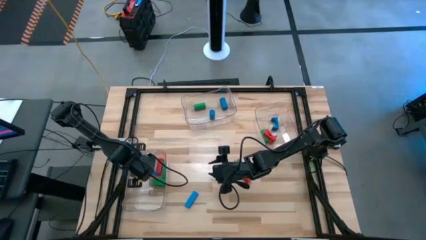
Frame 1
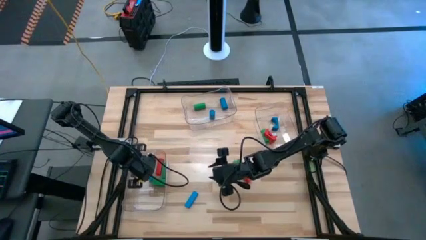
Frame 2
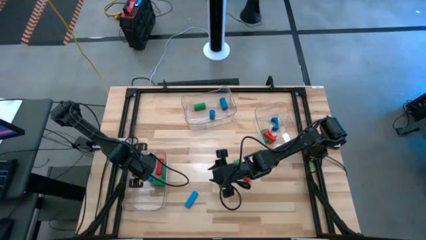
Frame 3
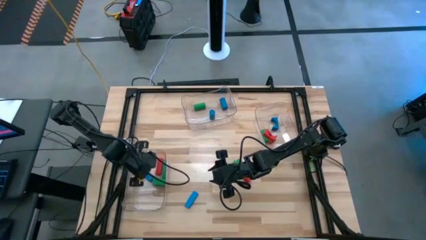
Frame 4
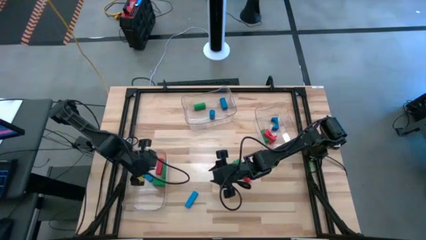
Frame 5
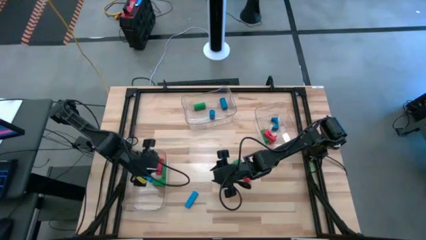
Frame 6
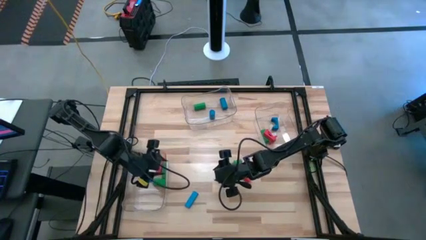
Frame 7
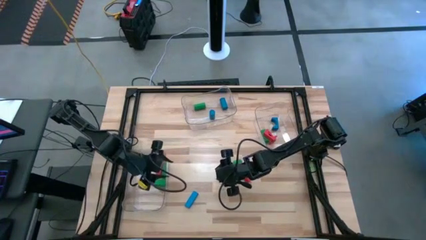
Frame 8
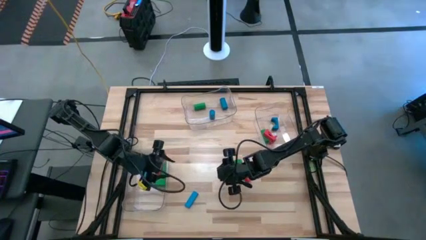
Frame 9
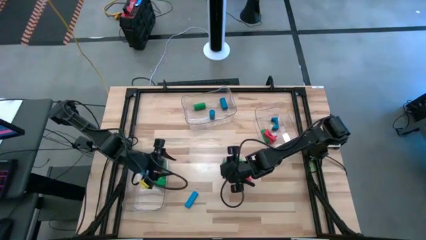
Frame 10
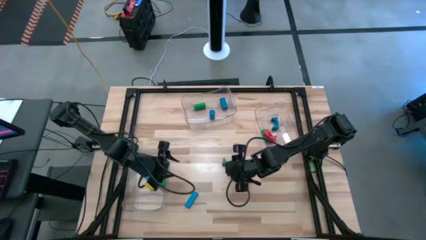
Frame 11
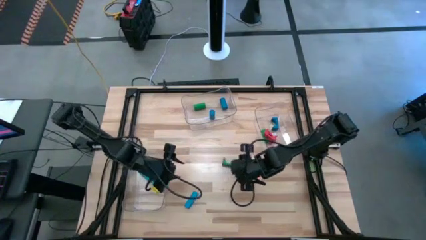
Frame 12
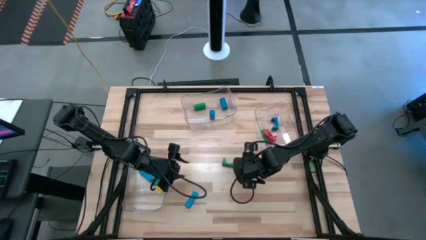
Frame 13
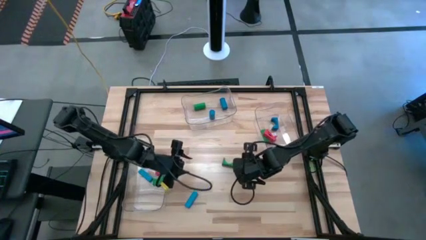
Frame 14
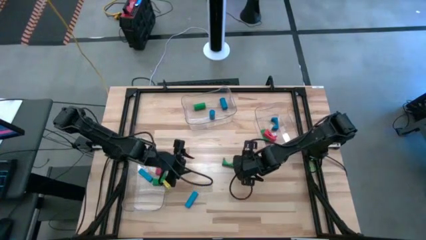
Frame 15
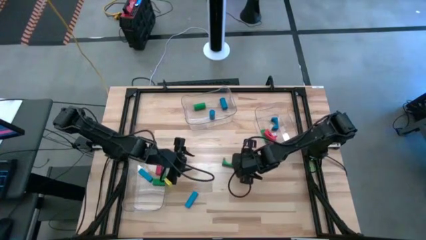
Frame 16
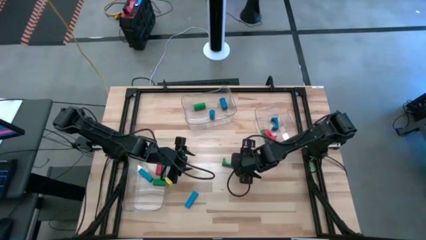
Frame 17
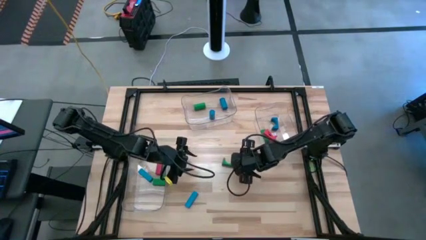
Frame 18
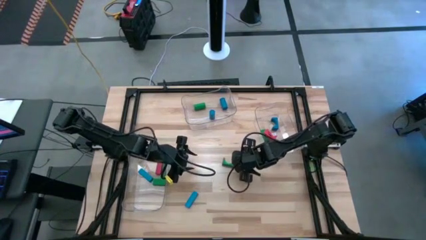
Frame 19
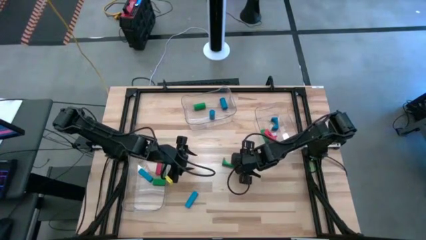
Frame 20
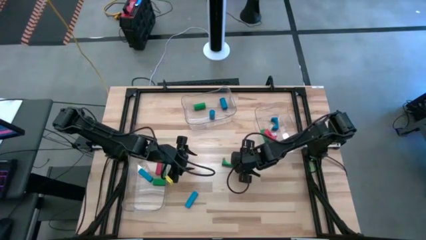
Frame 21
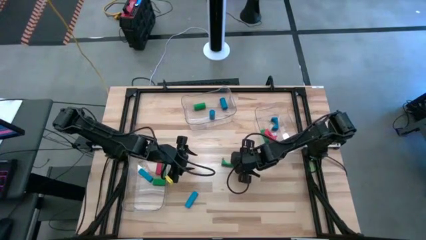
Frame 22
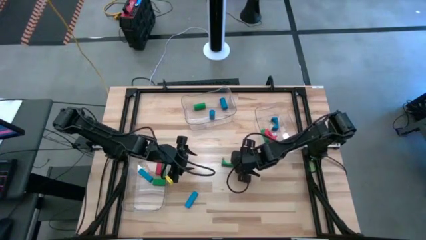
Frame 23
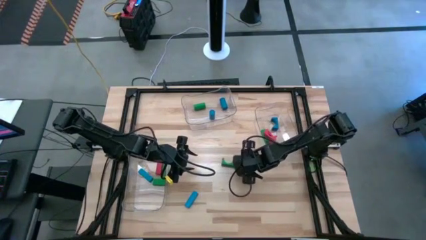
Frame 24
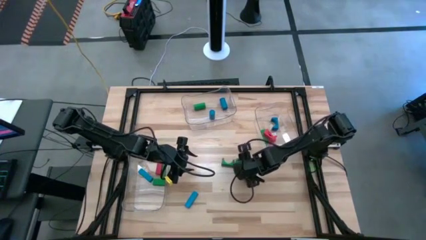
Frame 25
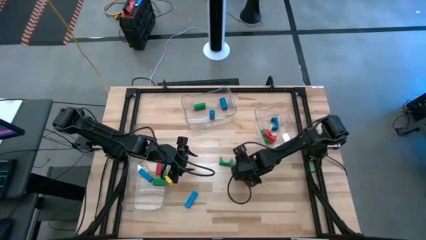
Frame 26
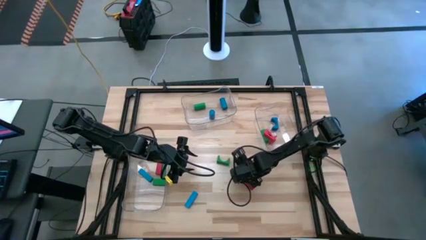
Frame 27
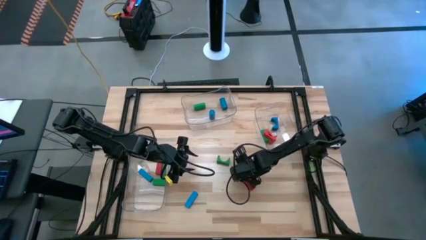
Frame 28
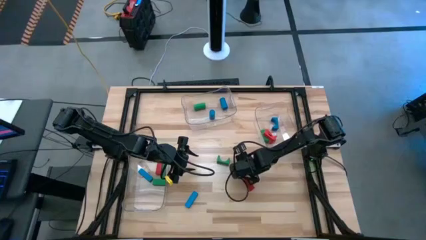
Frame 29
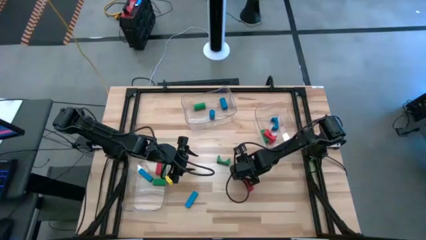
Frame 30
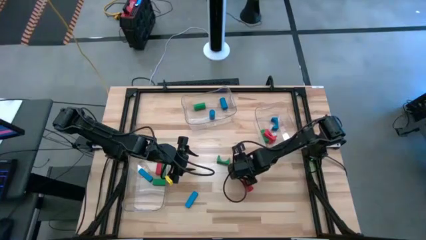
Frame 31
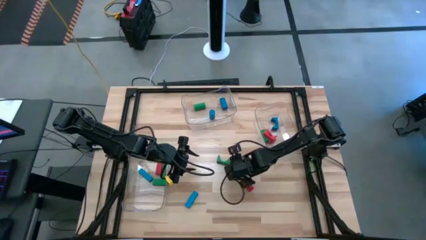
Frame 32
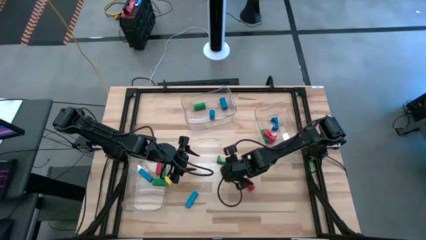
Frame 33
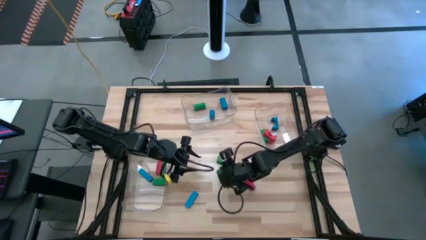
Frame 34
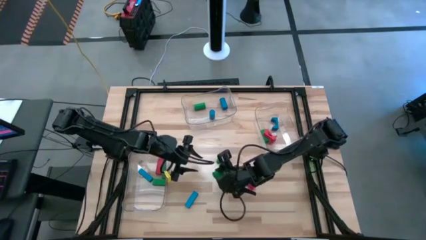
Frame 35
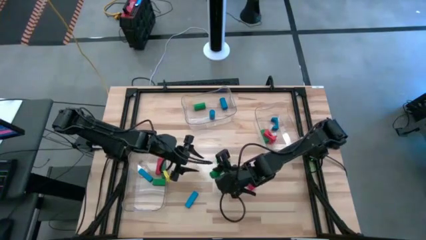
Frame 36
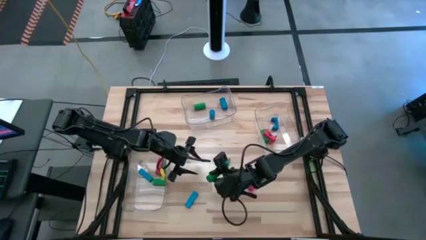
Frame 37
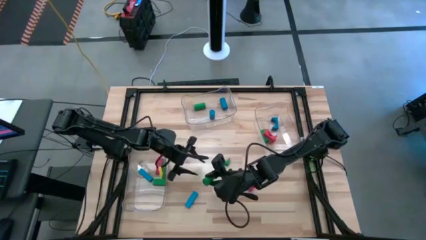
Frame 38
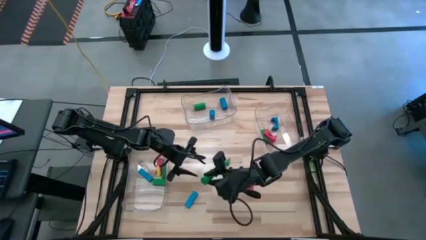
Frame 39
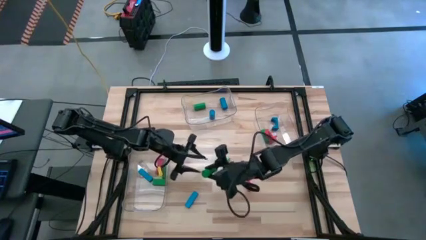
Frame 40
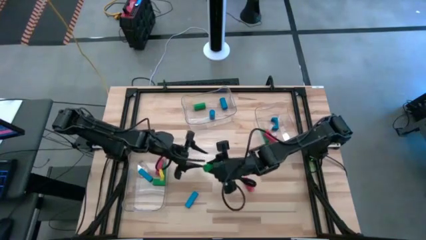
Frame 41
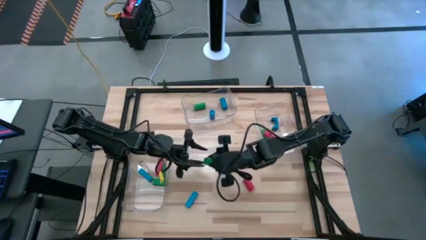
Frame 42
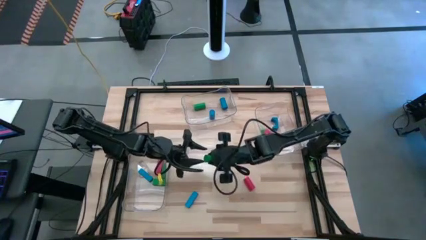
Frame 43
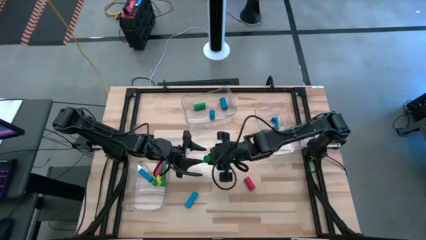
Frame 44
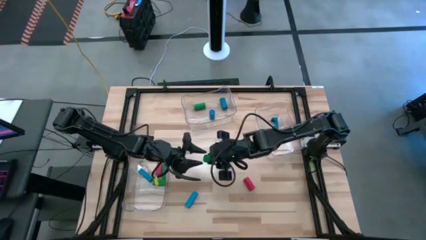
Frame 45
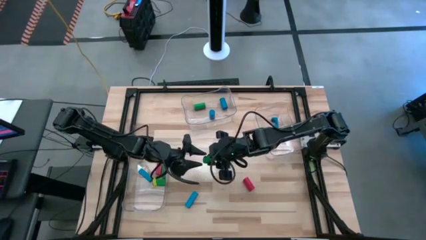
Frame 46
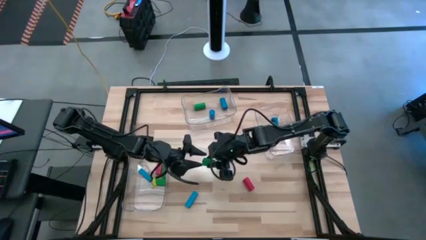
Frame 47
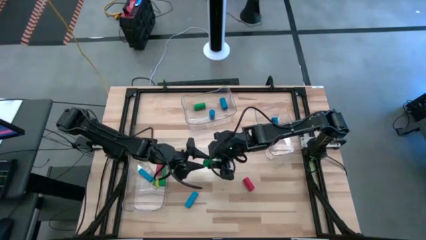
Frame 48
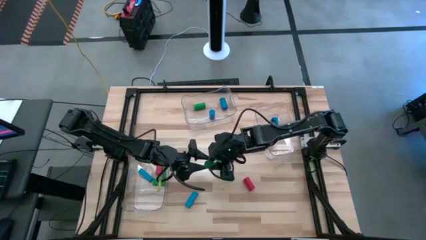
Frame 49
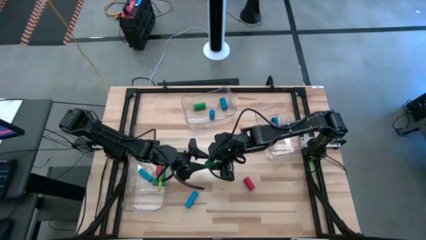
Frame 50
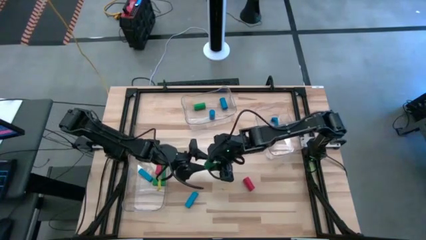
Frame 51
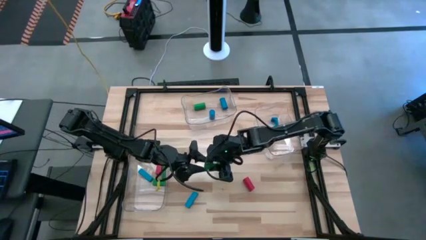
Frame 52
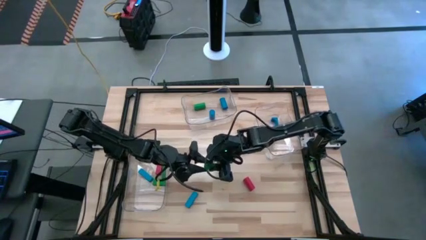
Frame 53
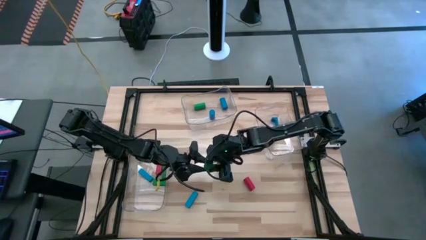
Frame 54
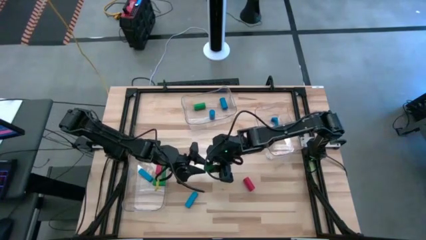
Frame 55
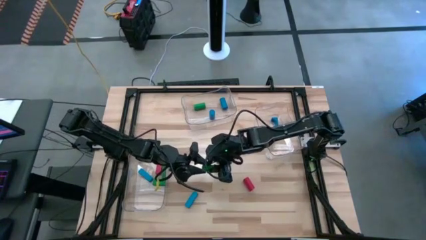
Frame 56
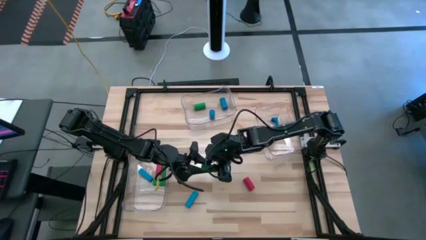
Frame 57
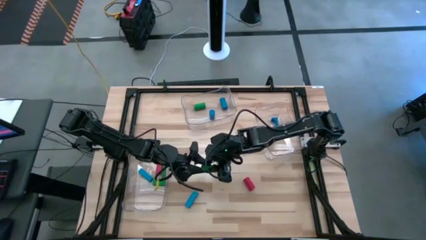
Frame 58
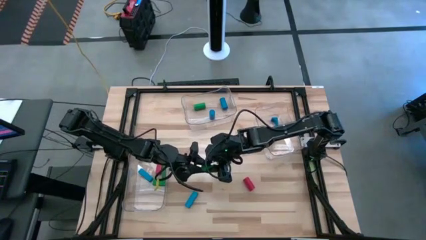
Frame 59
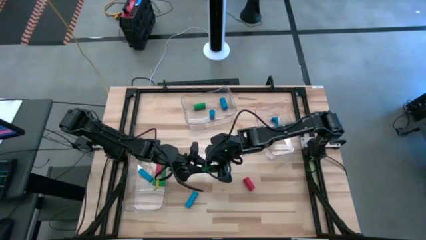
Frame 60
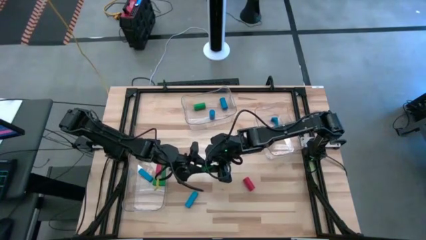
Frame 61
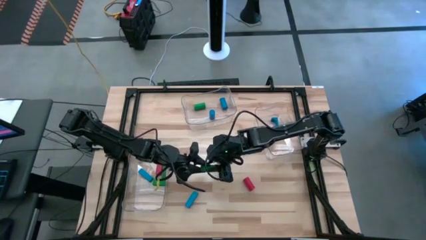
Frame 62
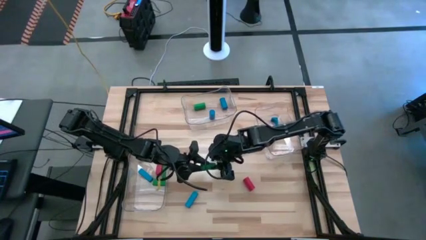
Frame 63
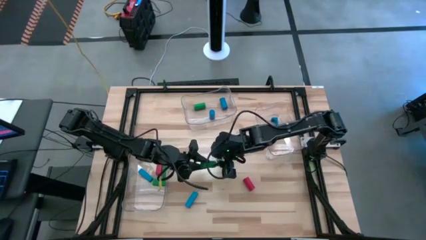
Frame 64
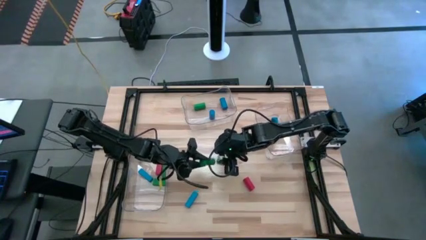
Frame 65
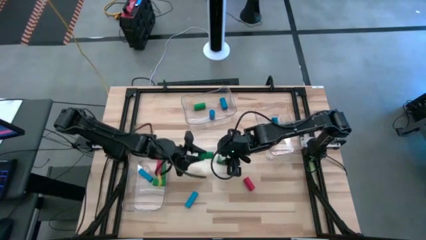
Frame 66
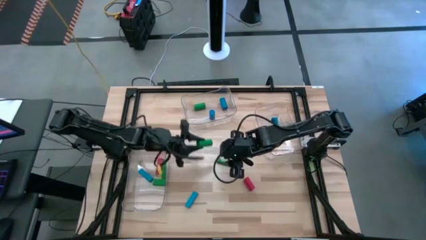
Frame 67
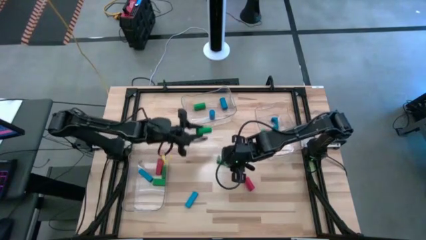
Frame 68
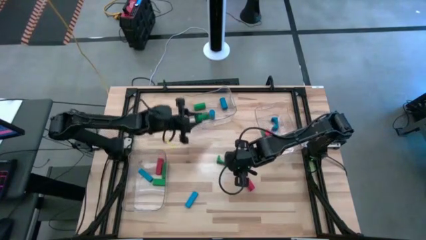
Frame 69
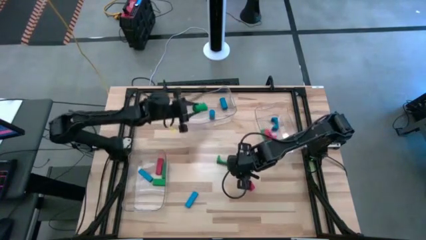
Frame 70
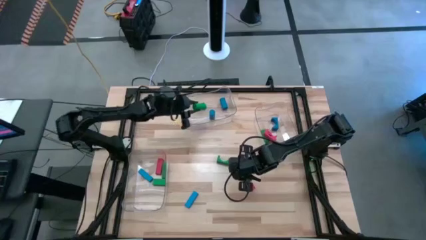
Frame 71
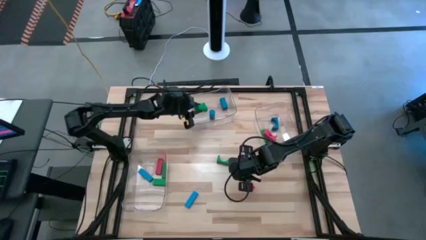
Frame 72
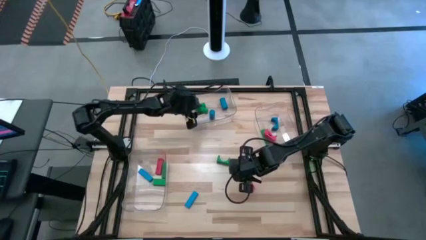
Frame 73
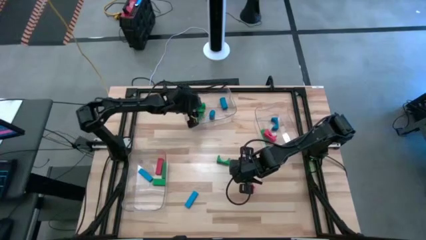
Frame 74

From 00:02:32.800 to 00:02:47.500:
Task: Sort blocks by size
Put the green cylinder block into the top transparent bin
